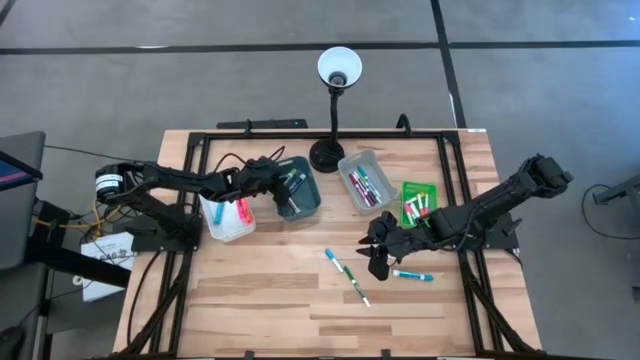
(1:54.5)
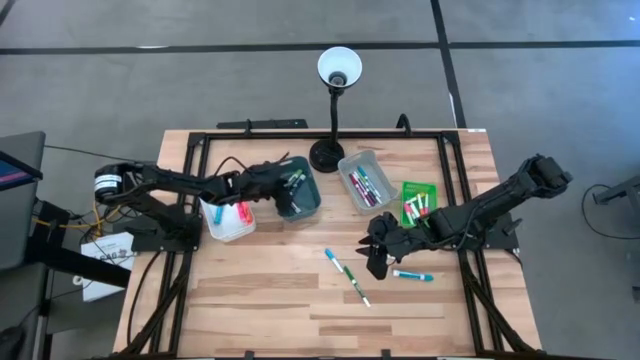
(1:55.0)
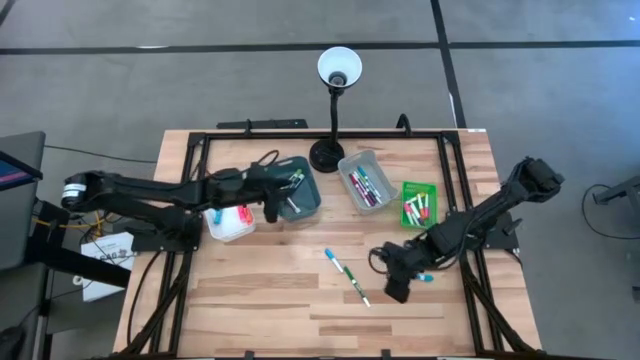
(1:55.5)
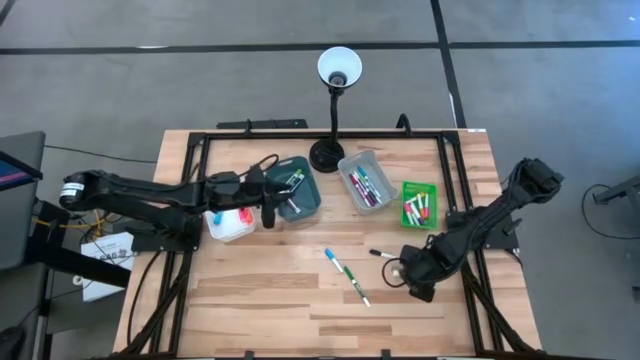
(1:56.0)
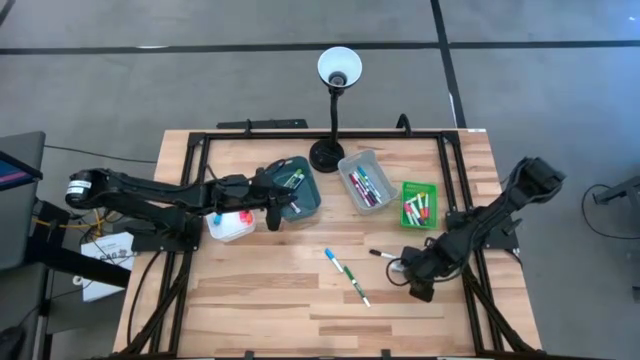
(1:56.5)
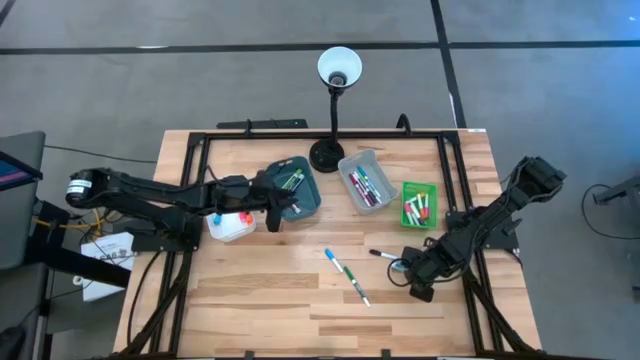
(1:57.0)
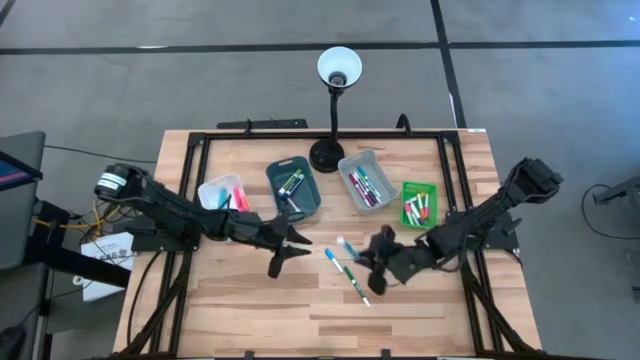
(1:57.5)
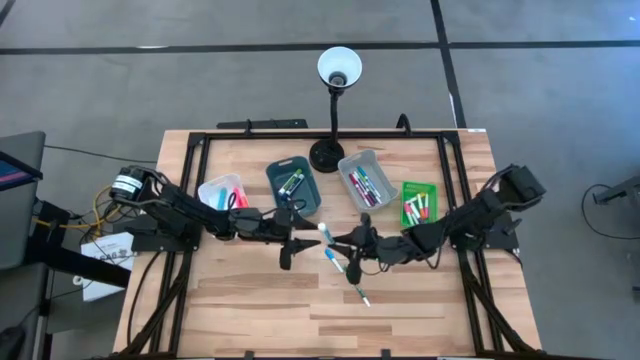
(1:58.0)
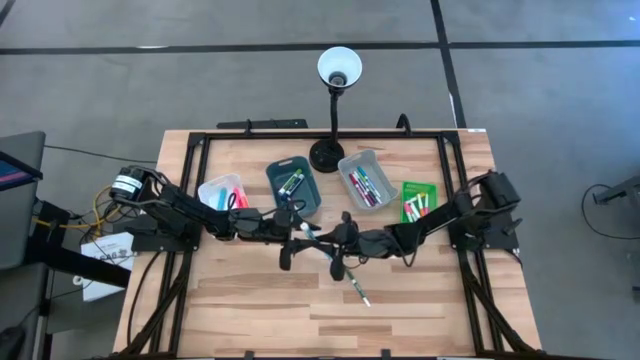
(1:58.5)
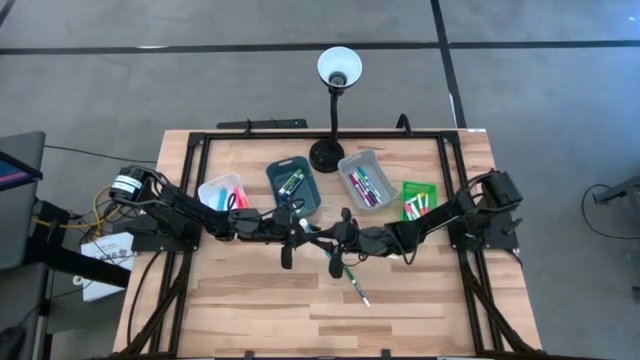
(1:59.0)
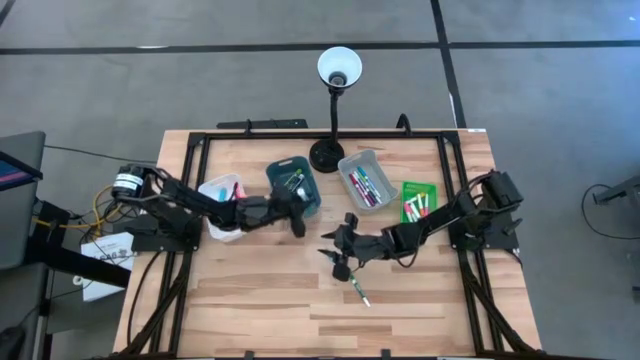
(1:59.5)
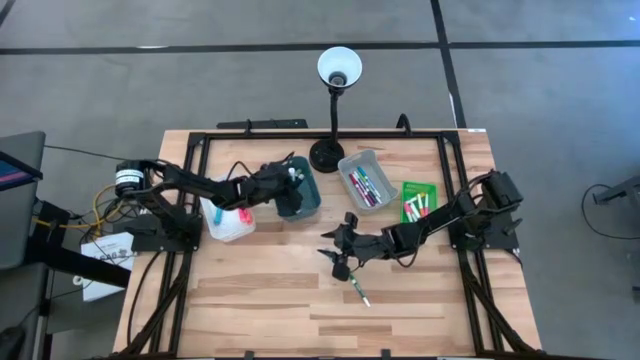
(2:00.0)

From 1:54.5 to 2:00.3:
Task: Pick & Place Markers
Put the blue big marker pen into the blue bin

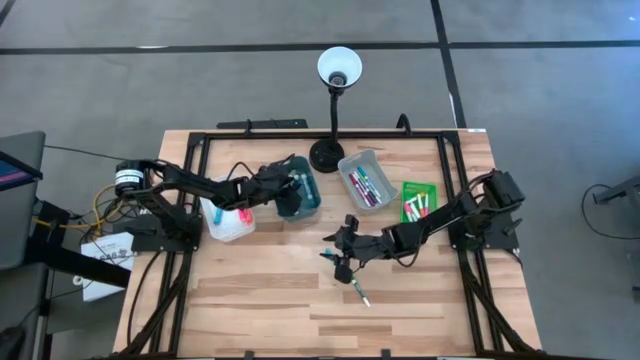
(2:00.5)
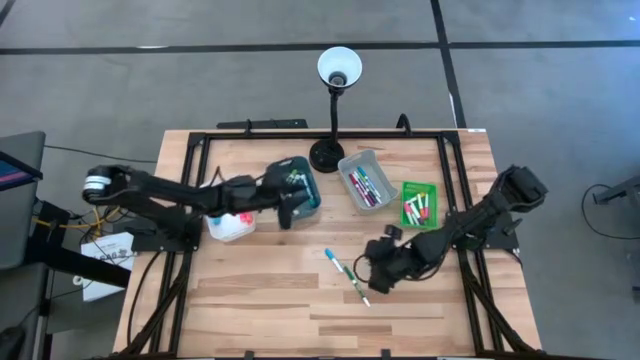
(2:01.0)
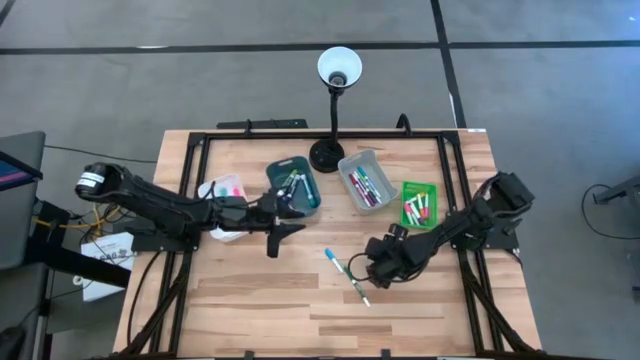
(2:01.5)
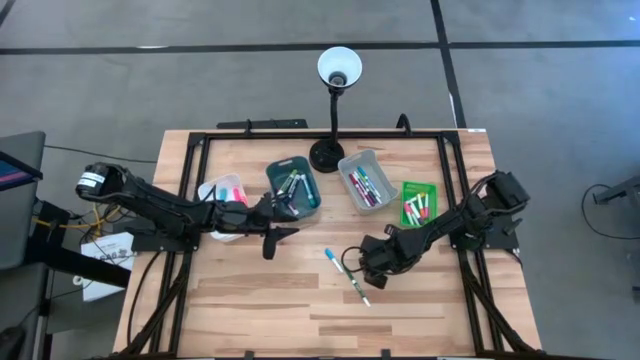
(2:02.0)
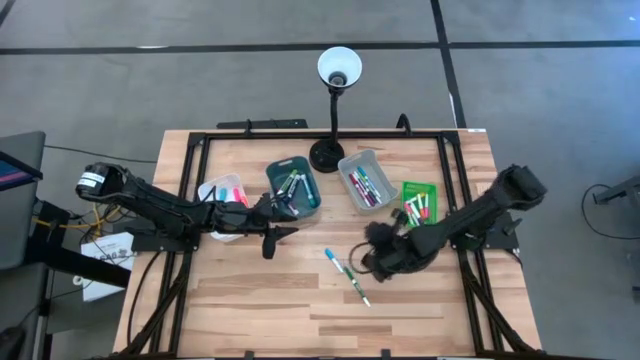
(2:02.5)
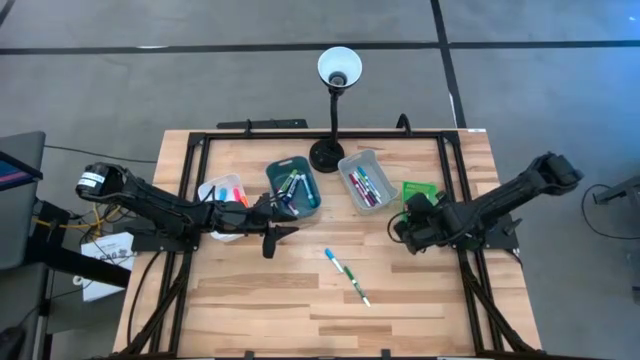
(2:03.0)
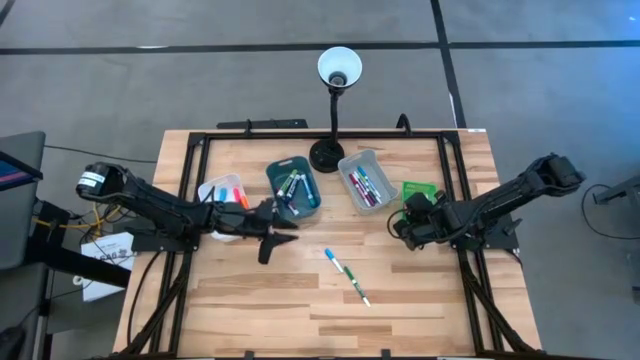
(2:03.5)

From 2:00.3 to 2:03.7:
Put the black highlighter pen into the green bin

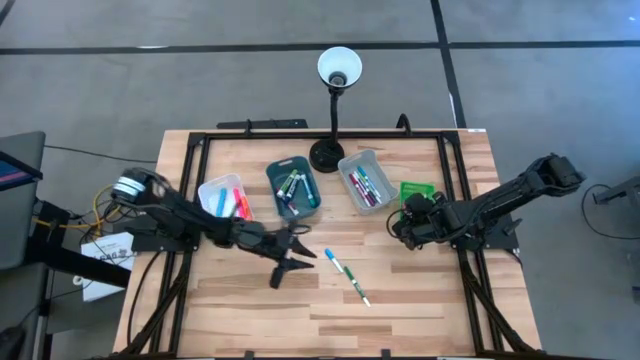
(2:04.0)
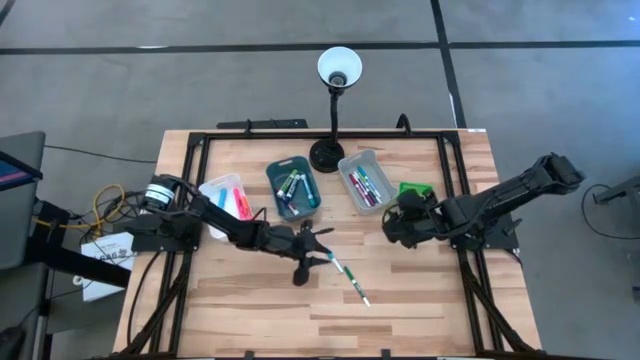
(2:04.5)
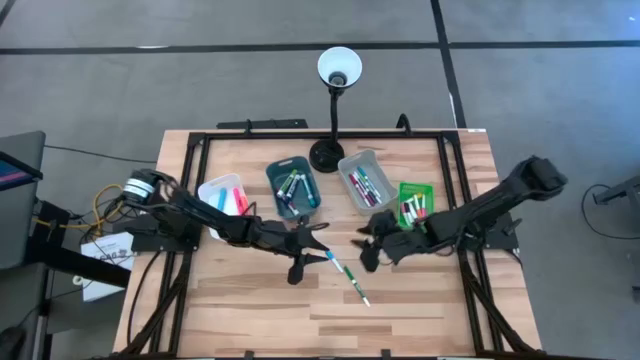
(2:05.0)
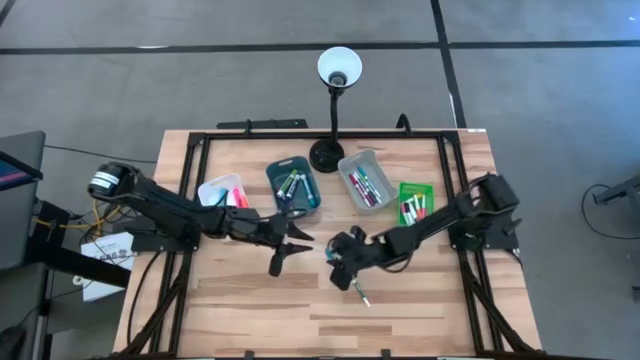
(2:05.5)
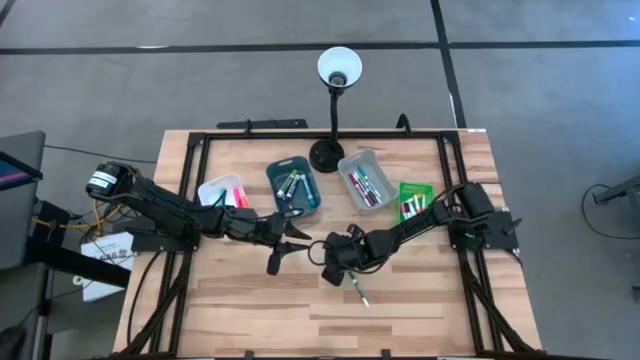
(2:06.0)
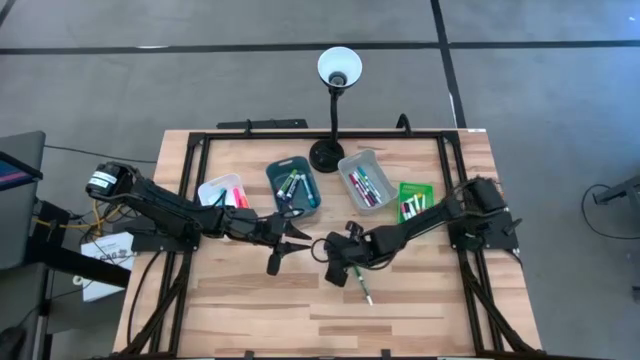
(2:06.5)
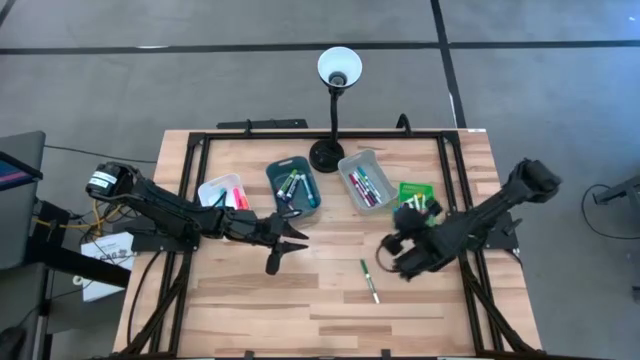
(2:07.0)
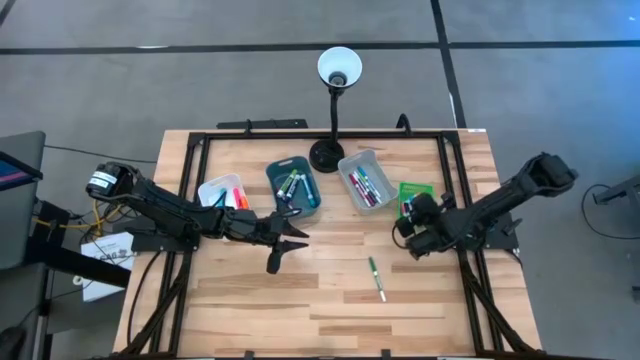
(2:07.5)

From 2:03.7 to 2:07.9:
Put the light blue highlighter pen into the green bin

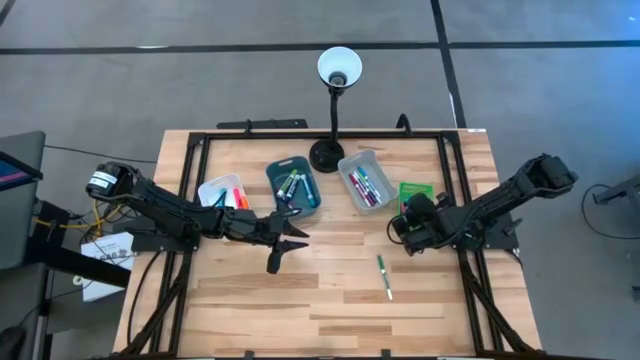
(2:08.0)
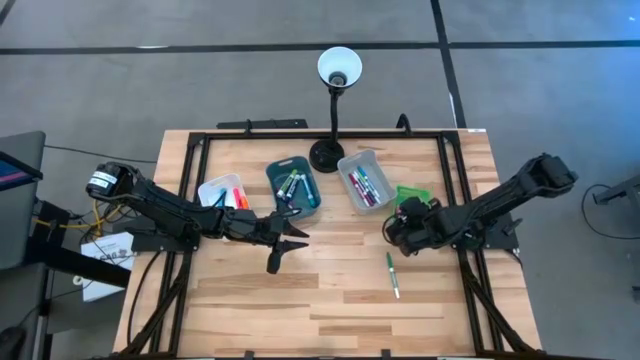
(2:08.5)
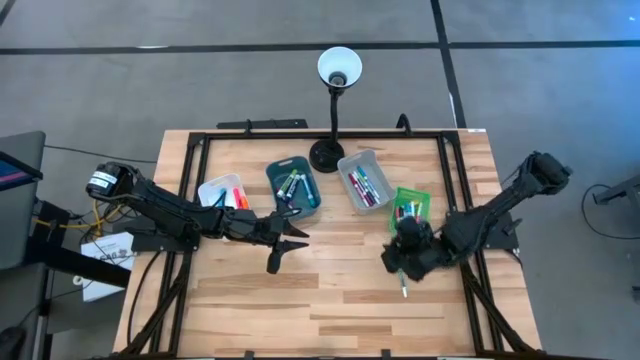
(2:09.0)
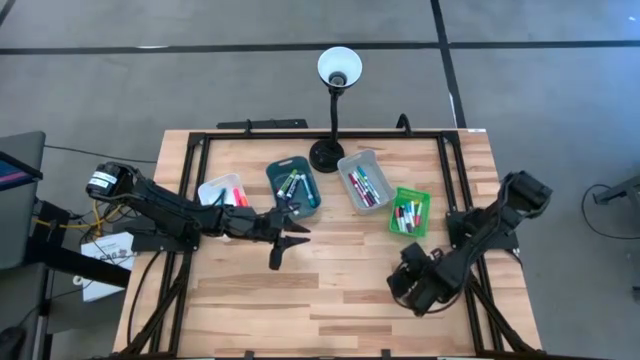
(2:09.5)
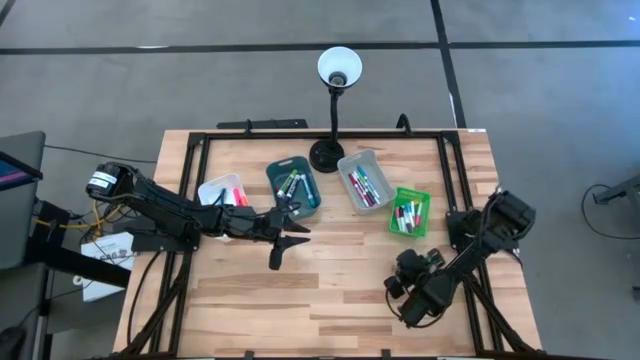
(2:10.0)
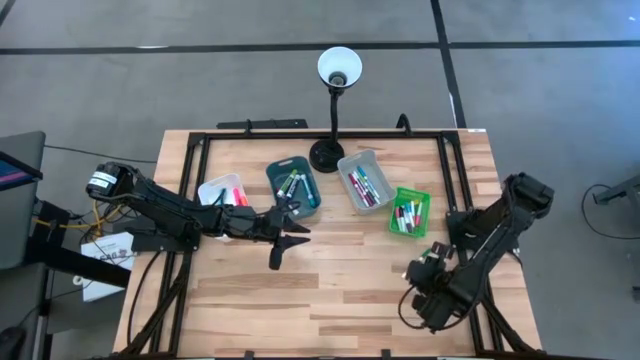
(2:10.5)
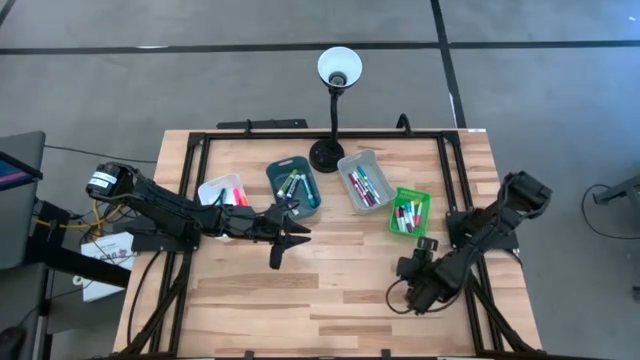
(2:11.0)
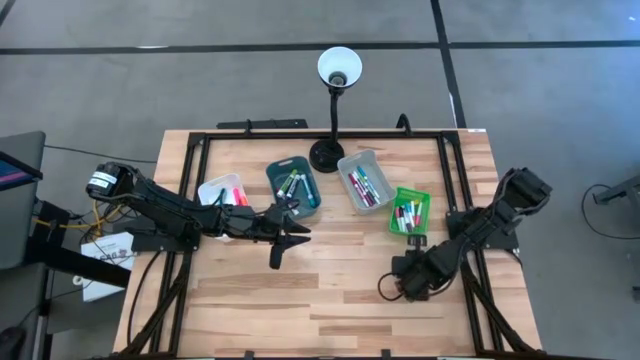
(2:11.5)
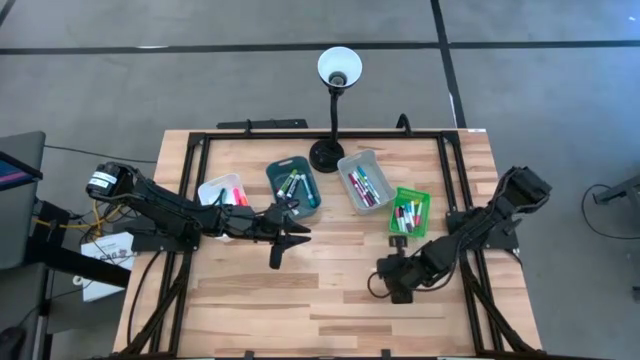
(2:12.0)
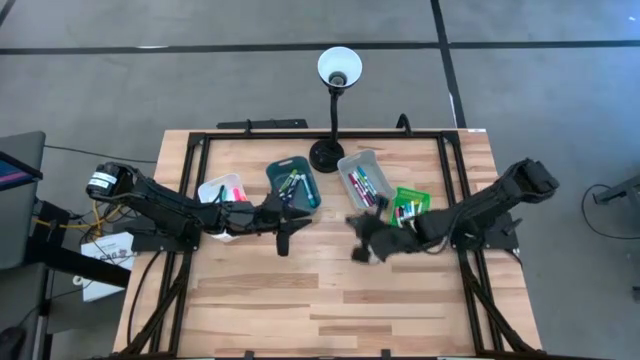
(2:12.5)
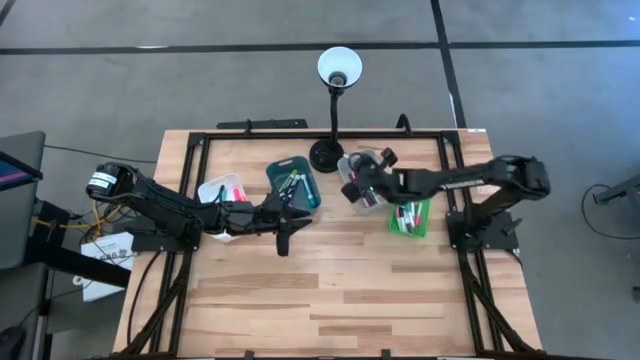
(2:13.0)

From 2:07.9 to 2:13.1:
Put the green small marker pen into the gray bin

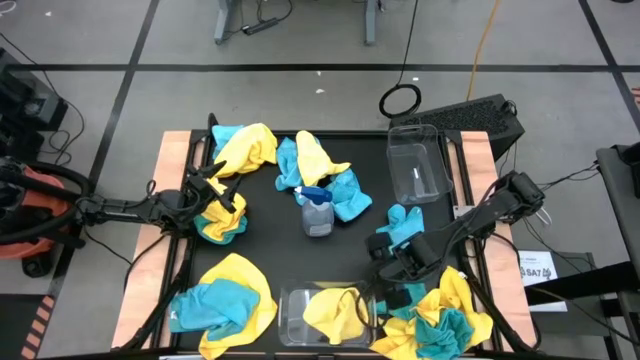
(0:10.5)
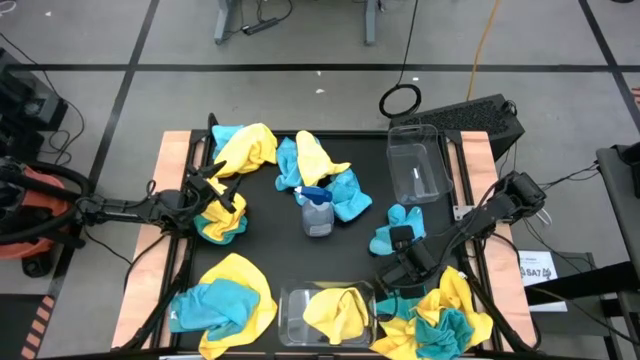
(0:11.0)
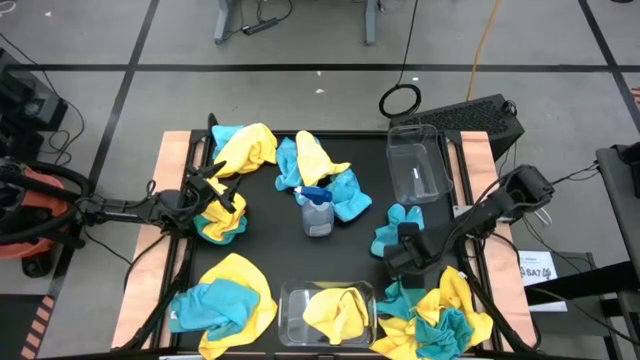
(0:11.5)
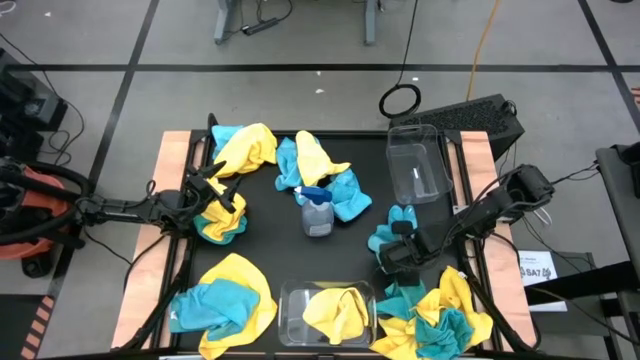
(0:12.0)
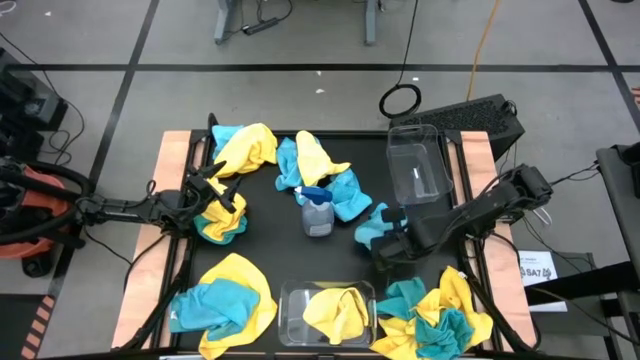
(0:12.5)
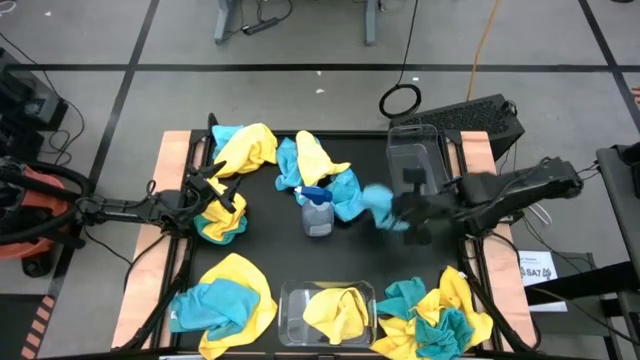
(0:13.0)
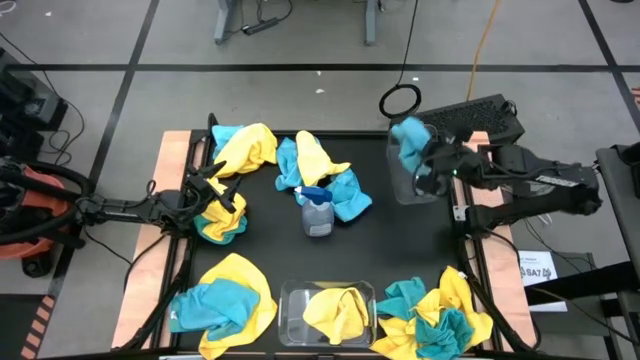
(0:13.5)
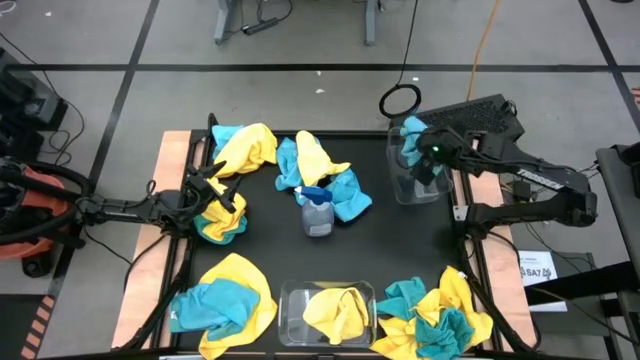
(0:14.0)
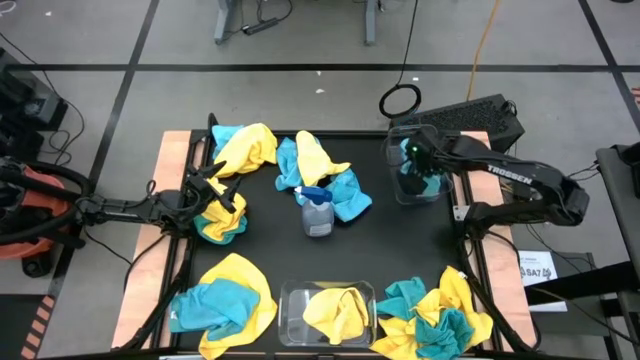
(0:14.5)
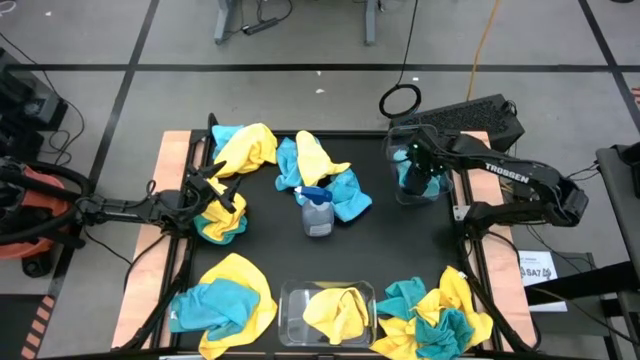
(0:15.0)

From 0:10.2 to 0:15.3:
Task: Sort microfiber towel by color & place in baskets
Put the blue towel into the top transparent bin
